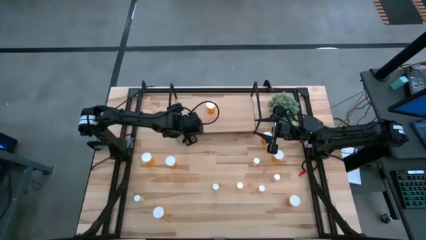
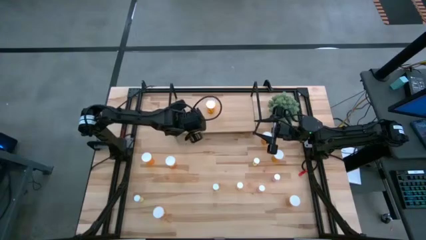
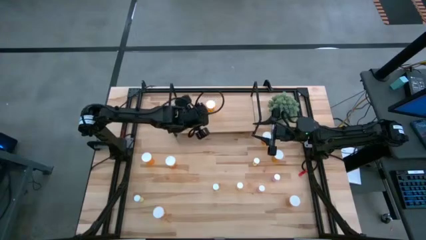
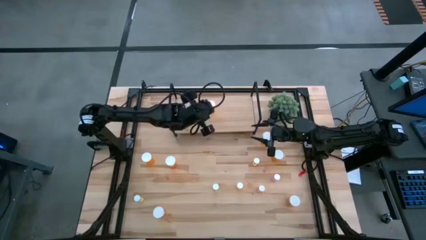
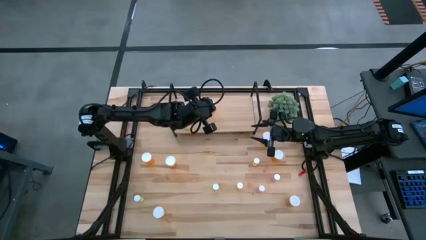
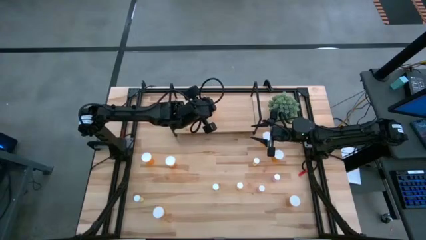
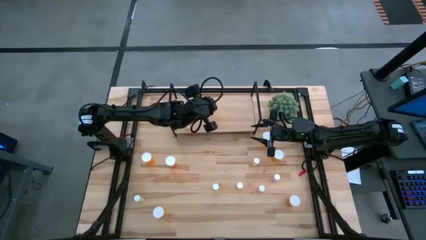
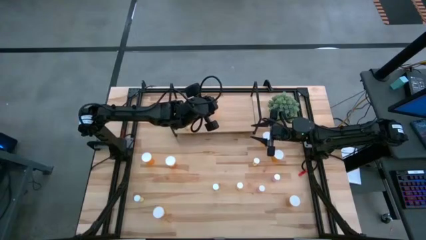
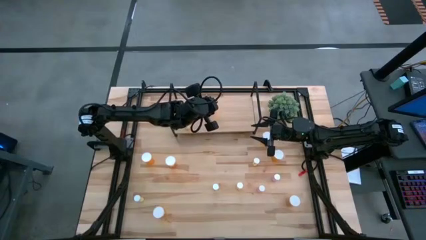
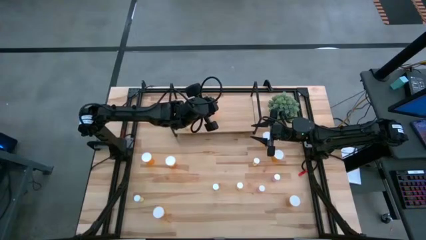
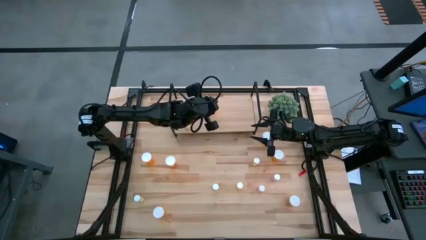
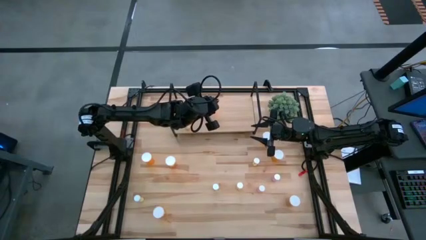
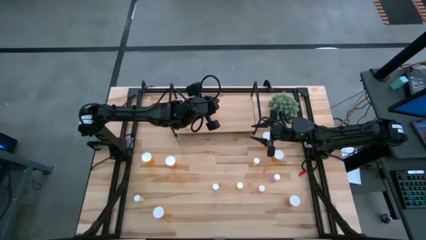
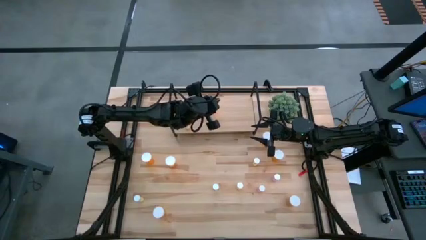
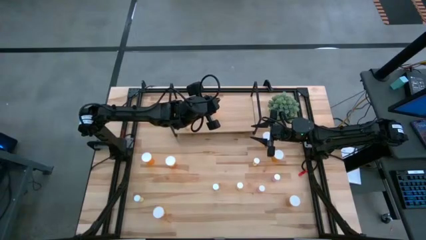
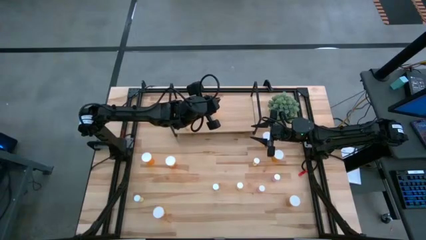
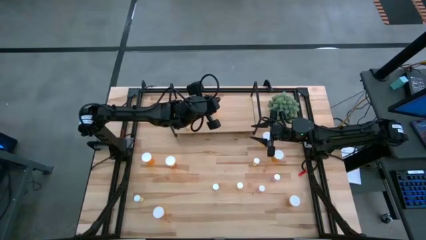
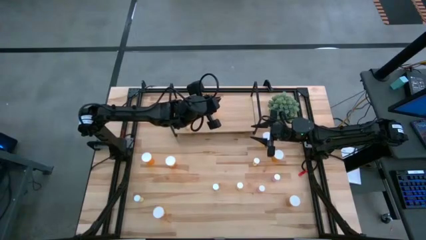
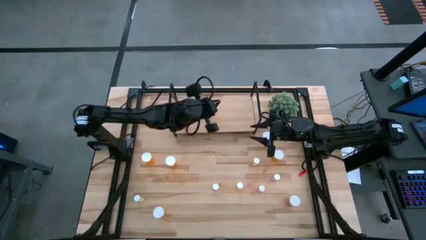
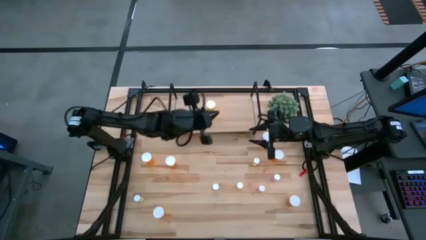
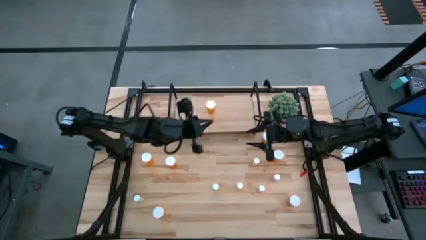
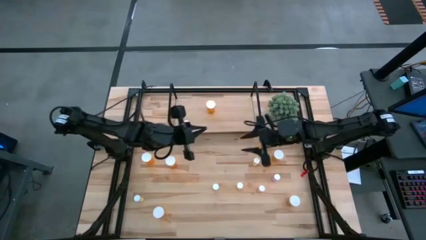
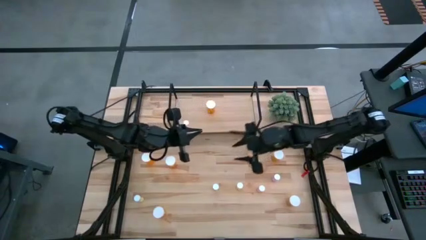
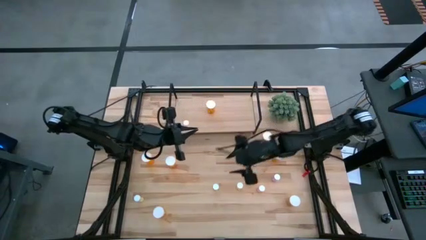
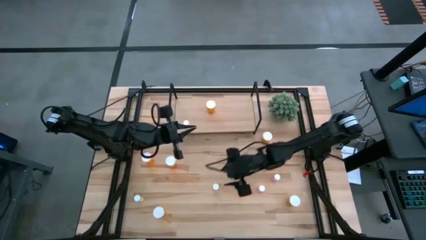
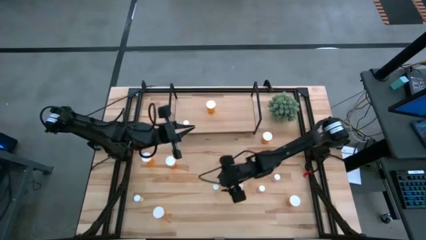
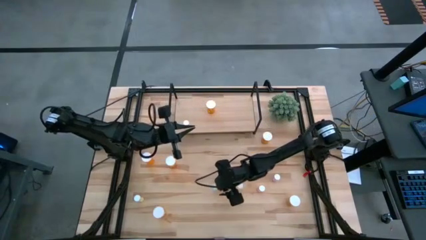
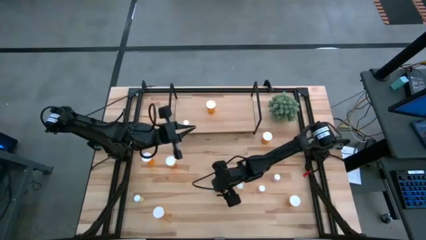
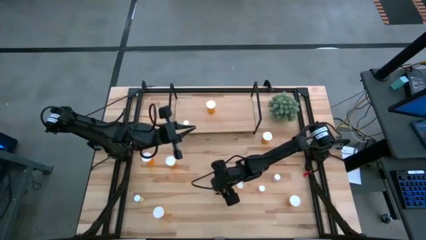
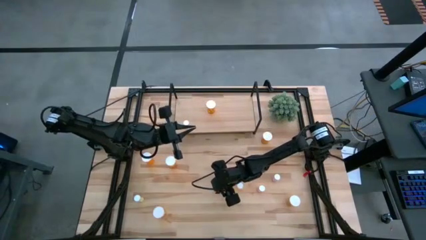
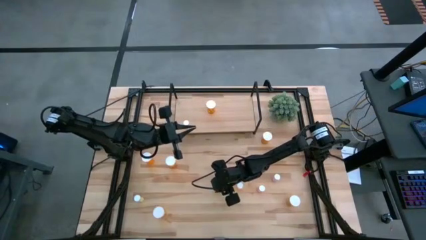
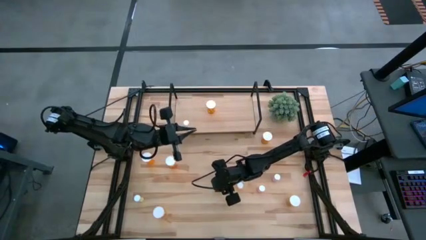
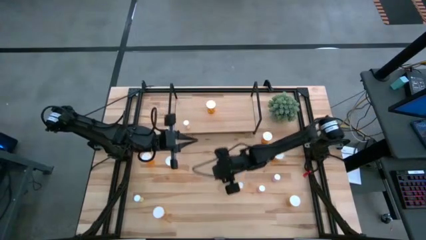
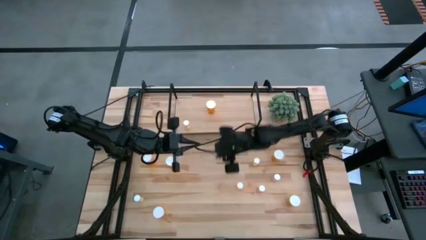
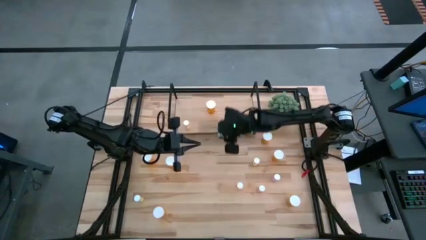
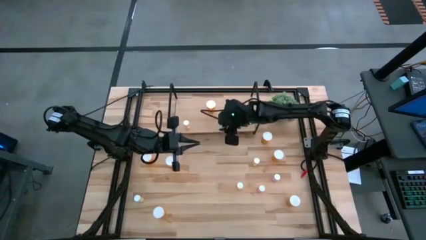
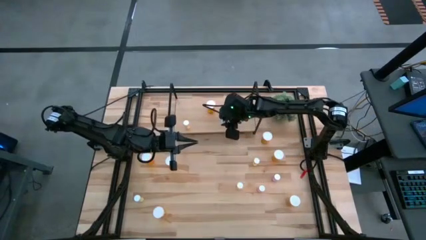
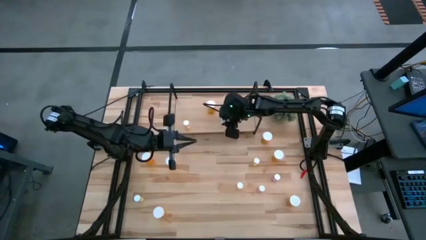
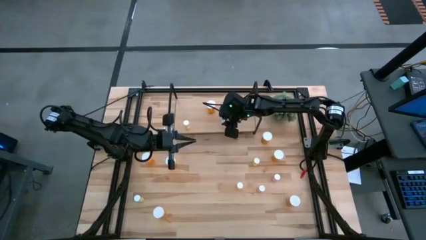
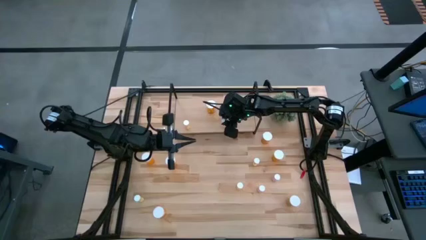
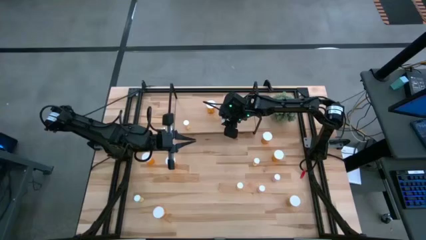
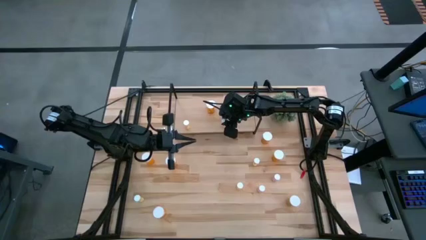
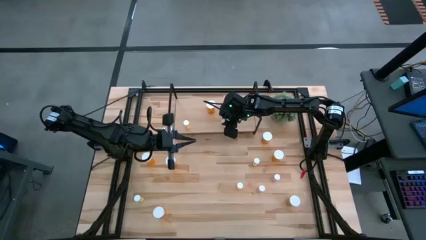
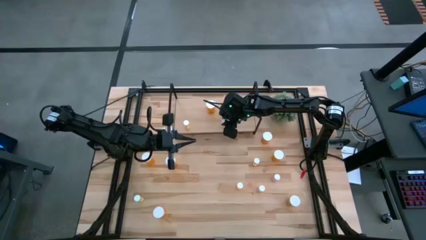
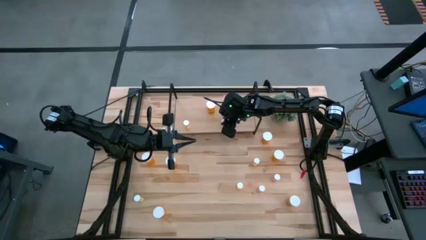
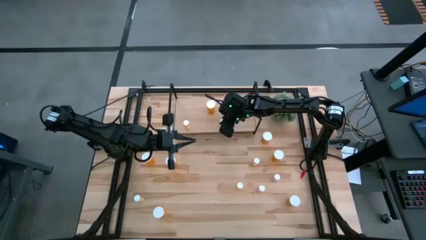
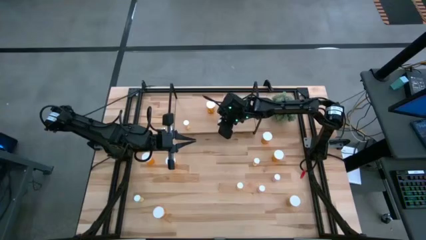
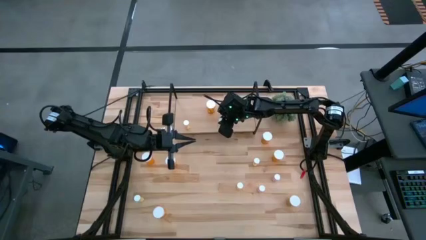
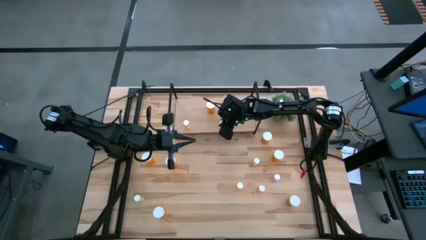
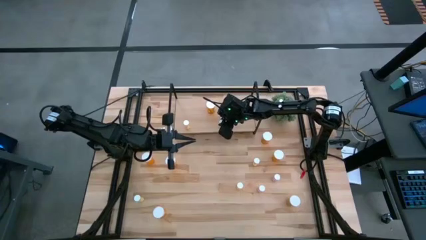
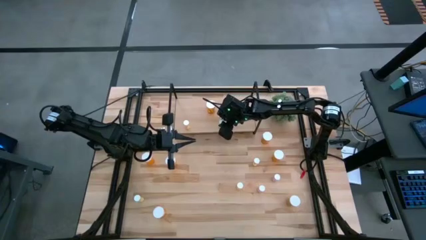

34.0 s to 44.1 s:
Task: Pick and place medicine bottles onto shelf by color
Put the small yellow pill bottle on the shelf

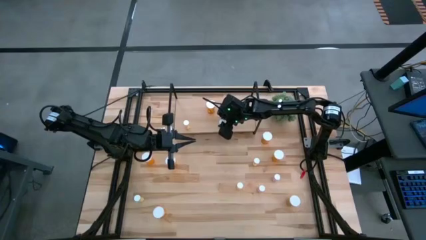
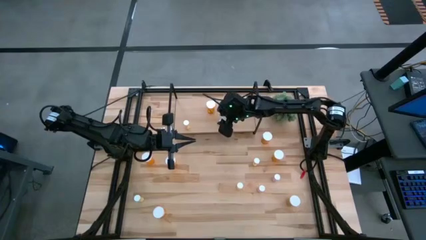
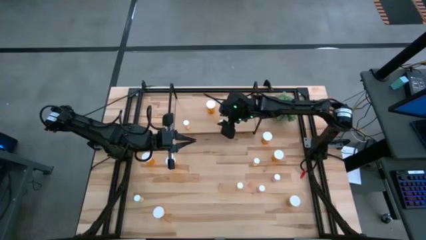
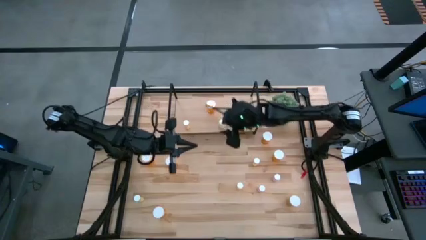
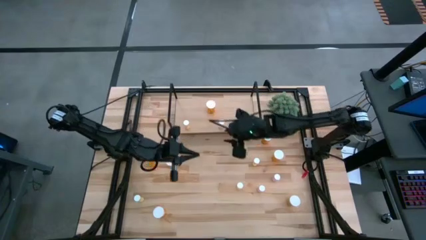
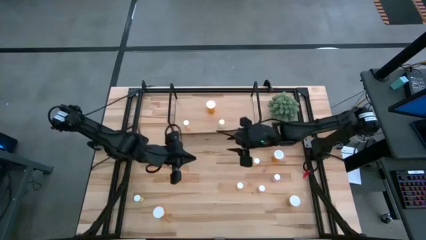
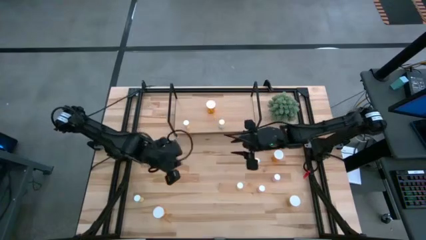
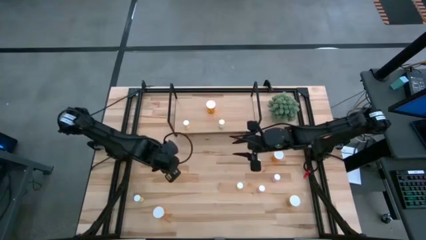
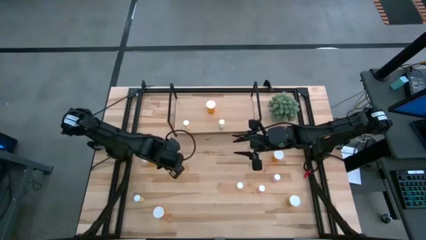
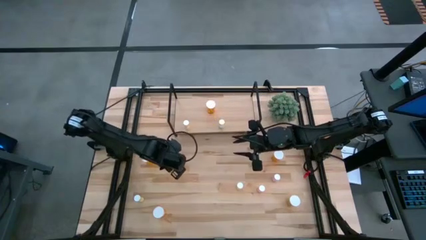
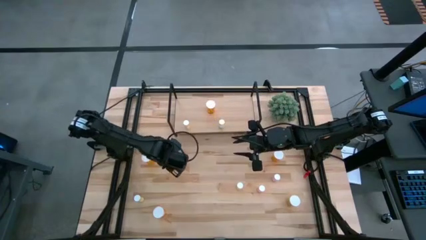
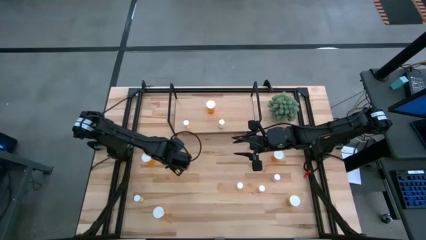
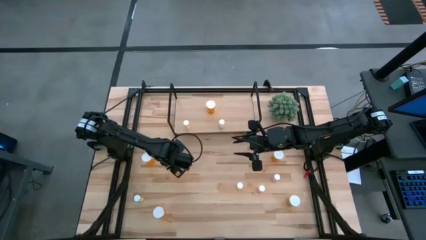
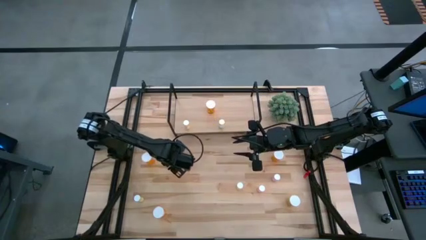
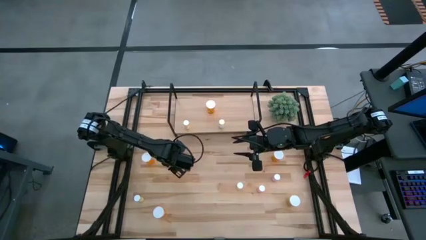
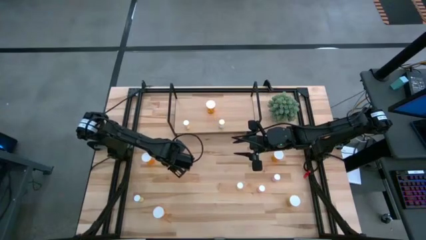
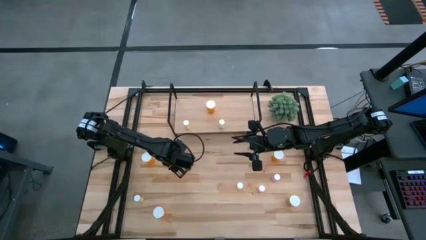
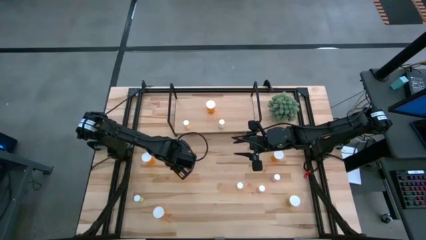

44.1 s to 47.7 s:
Put the large orange pill bottle on the shelf aligned with the other large orange pill bottle

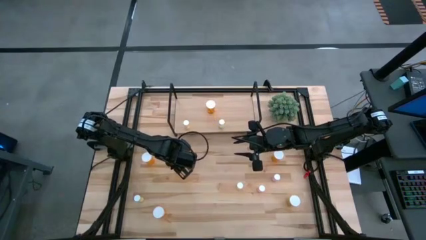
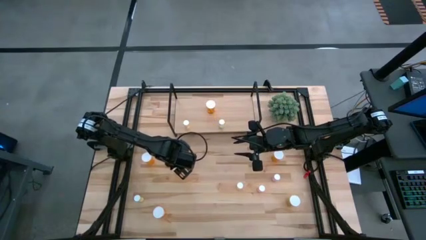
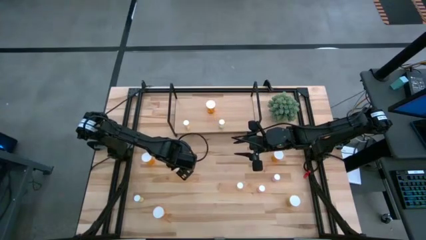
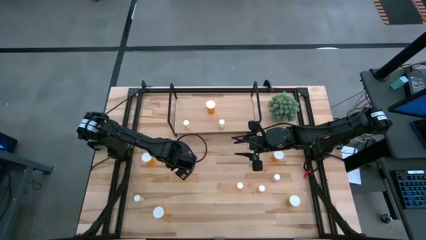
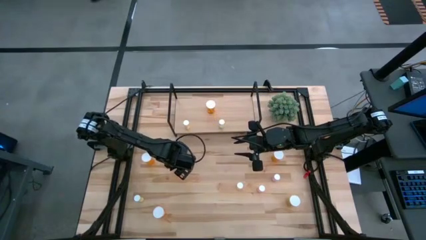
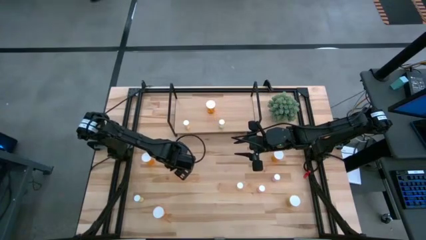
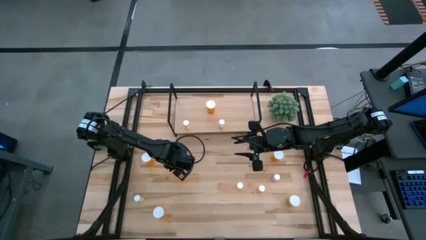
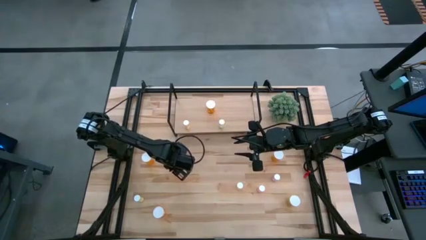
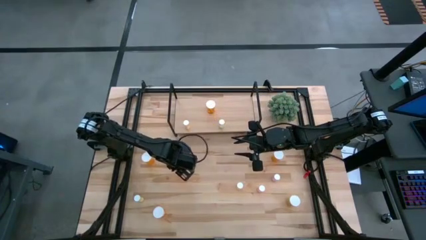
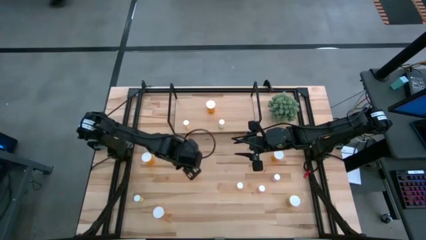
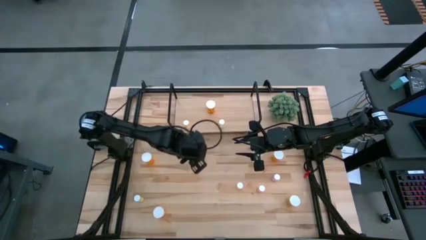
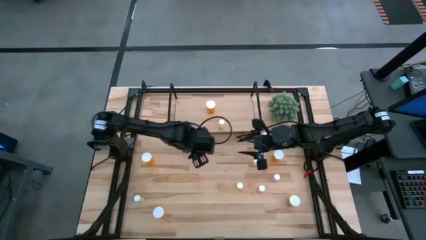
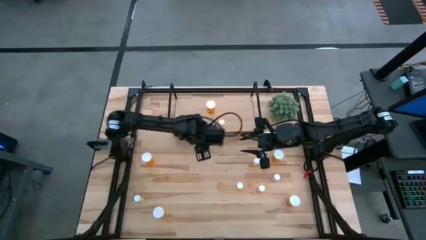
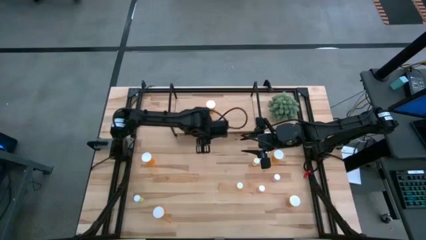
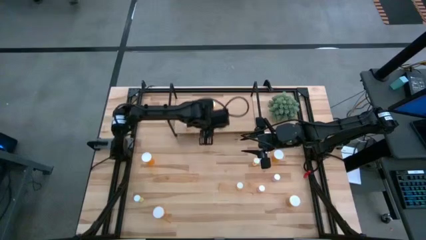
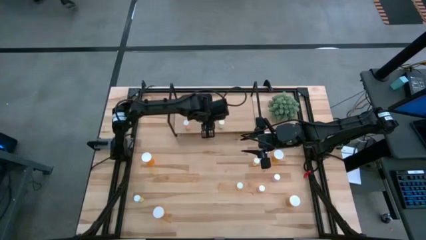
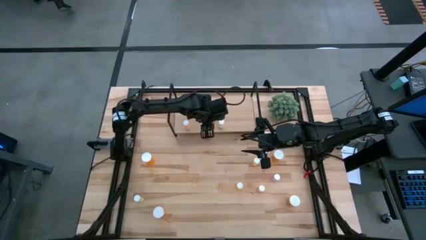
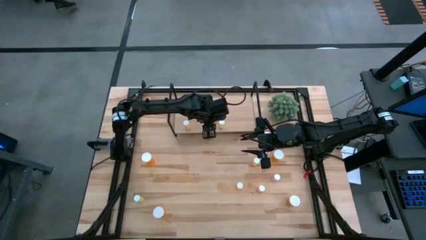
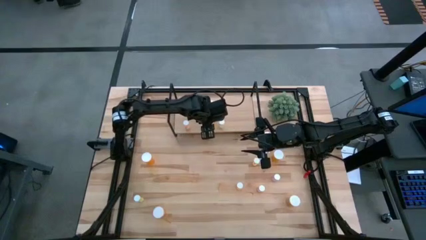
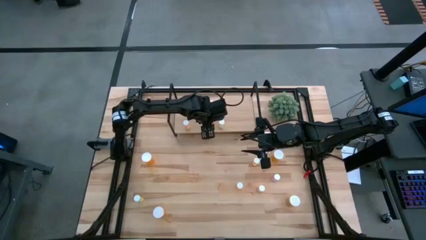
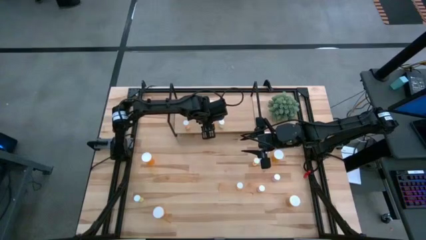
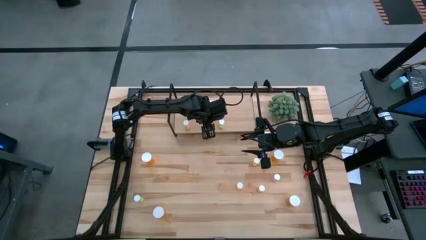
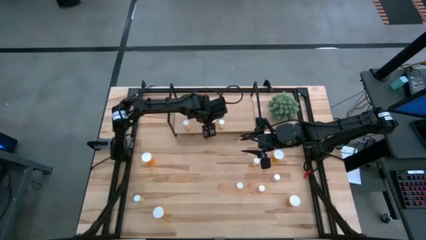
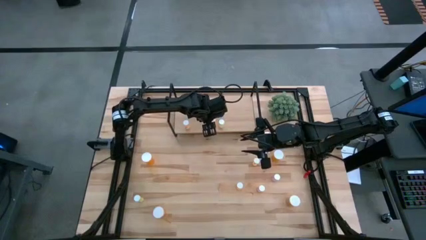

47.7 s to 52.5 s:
Put the large orange pill bottle on the shelf aligned with the other large orange pill bottle
